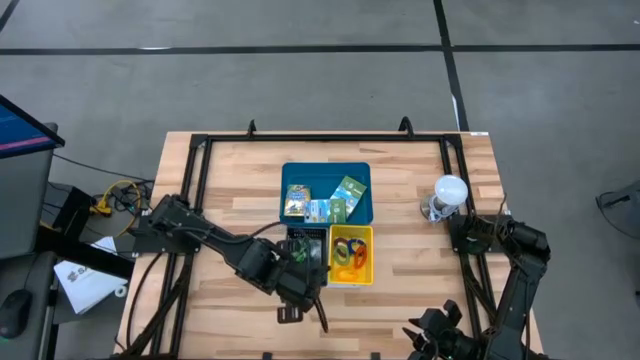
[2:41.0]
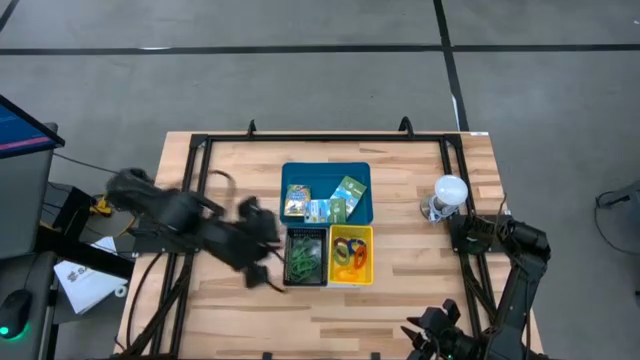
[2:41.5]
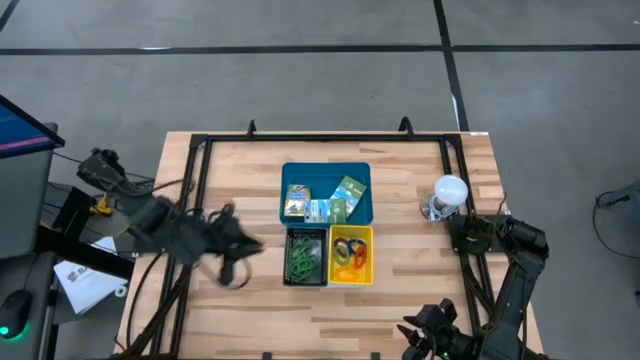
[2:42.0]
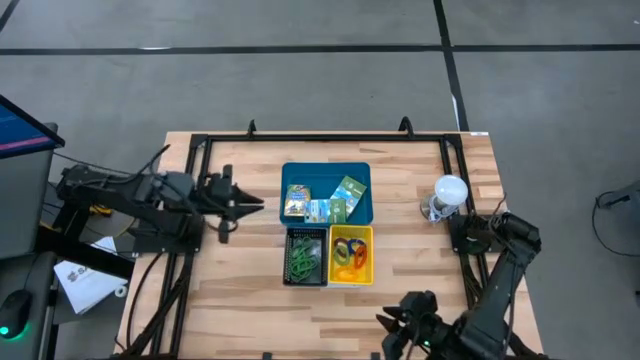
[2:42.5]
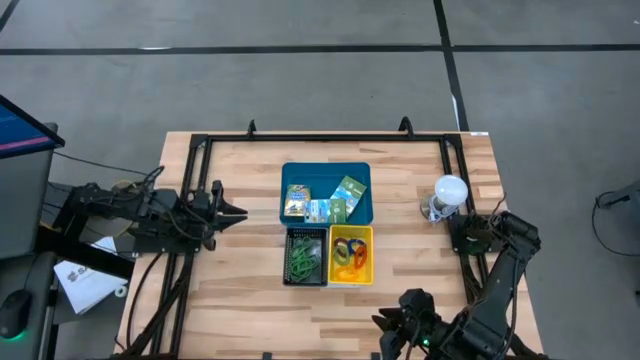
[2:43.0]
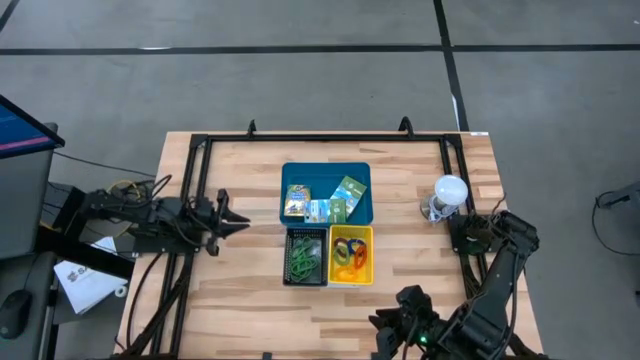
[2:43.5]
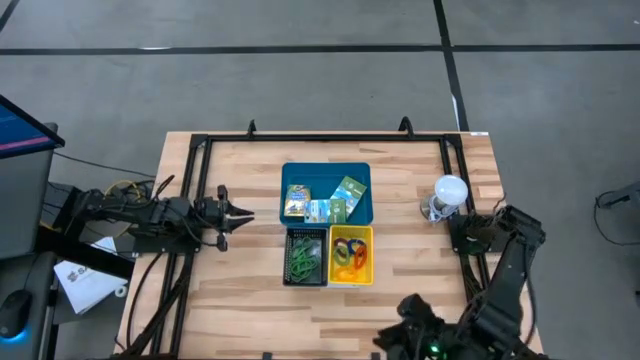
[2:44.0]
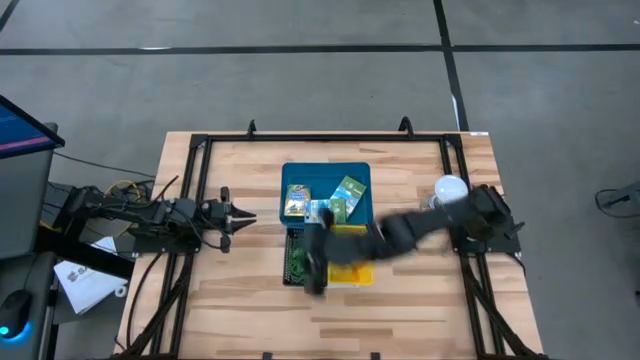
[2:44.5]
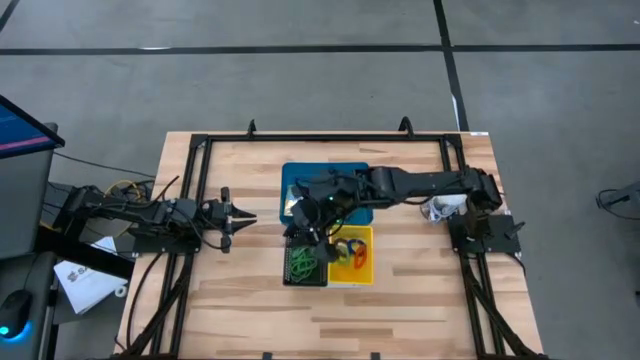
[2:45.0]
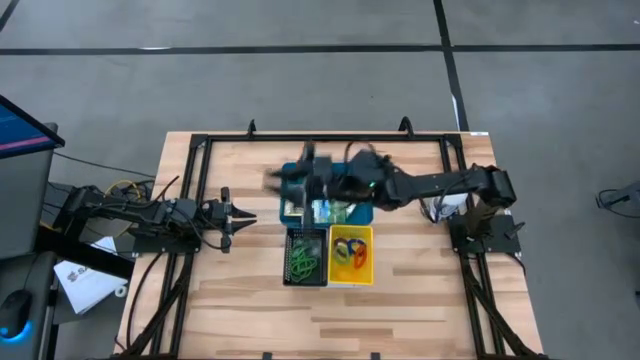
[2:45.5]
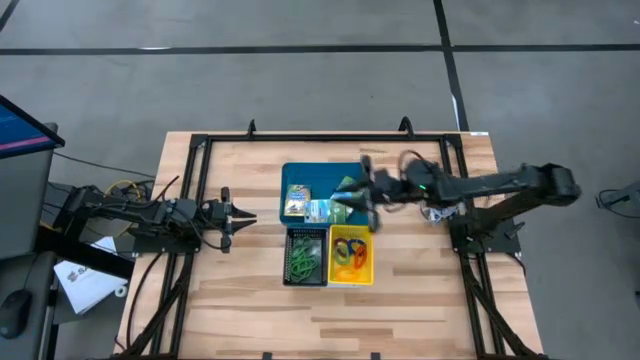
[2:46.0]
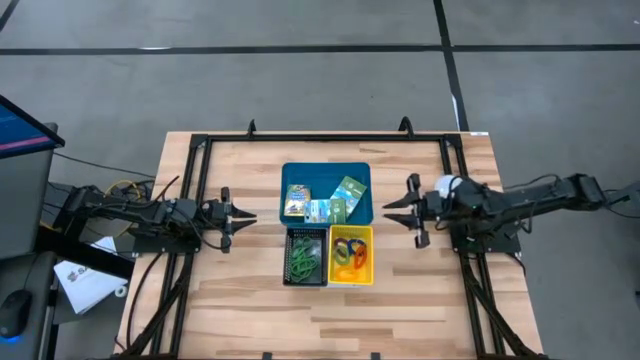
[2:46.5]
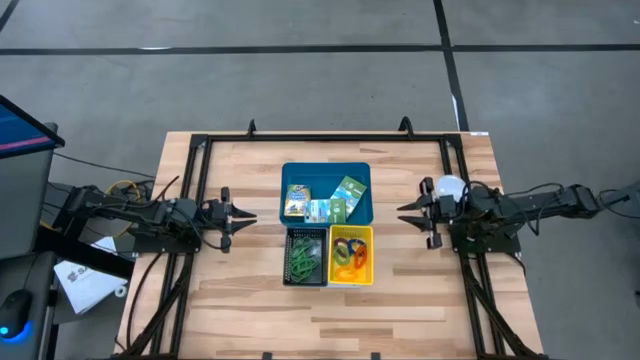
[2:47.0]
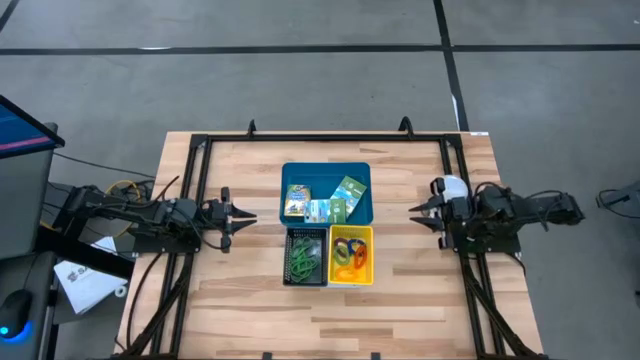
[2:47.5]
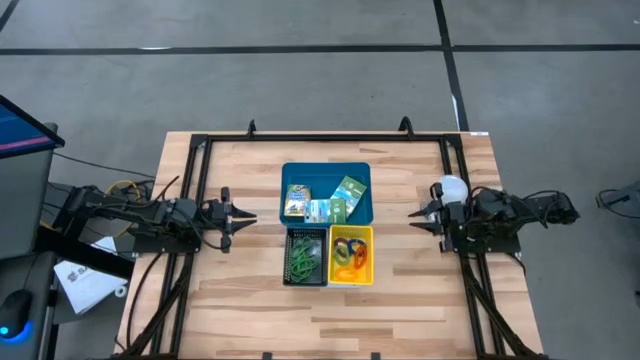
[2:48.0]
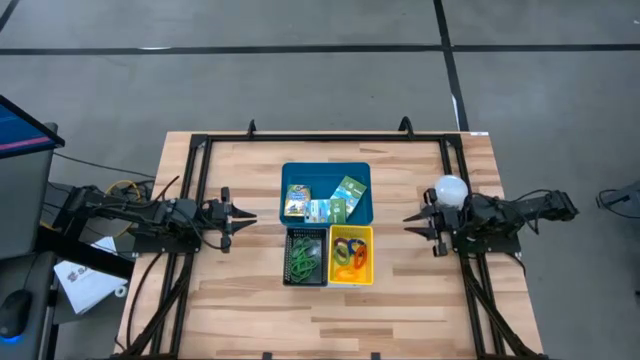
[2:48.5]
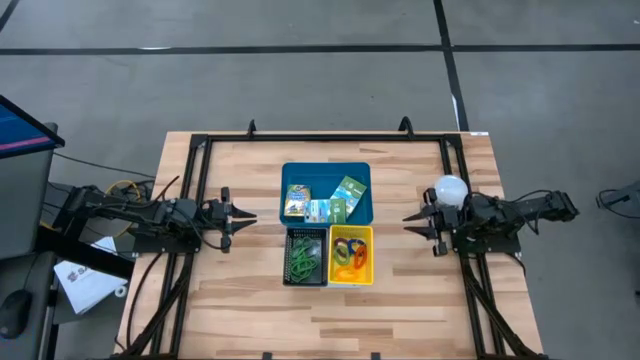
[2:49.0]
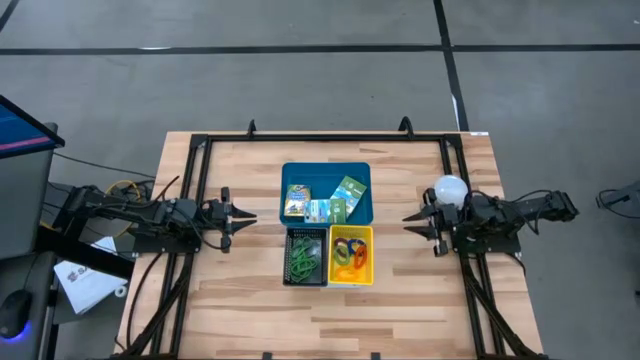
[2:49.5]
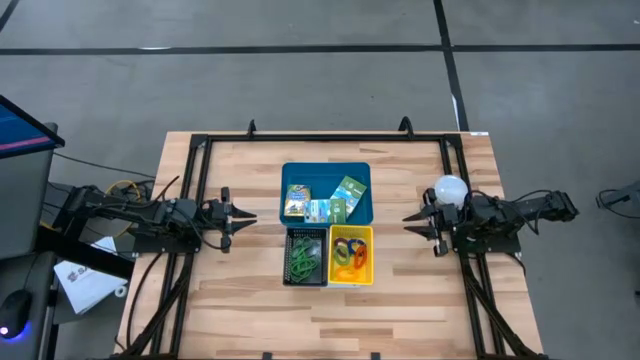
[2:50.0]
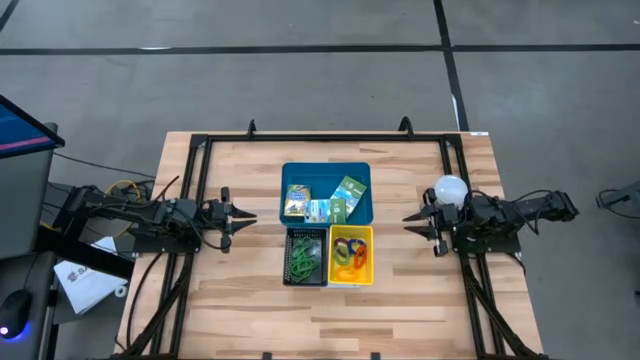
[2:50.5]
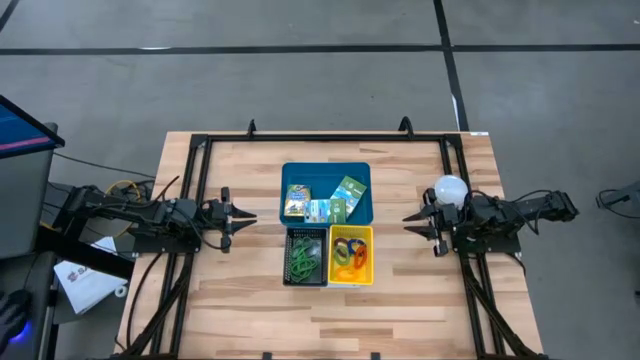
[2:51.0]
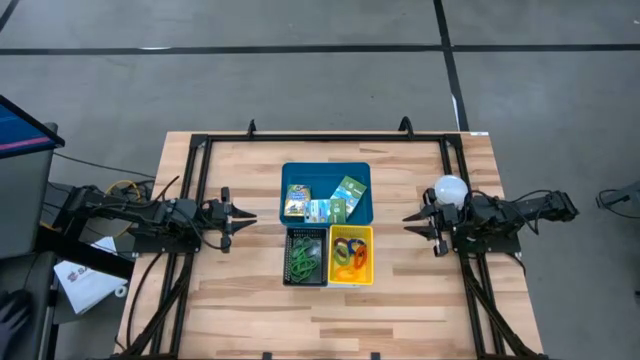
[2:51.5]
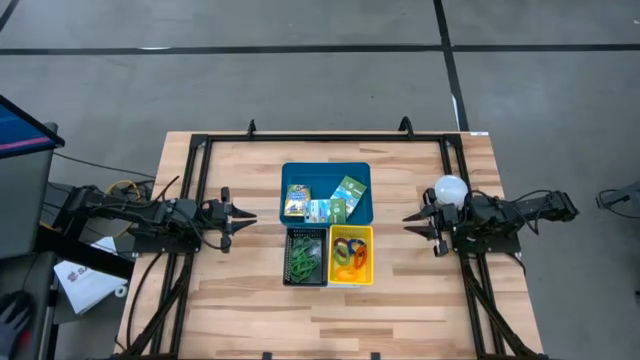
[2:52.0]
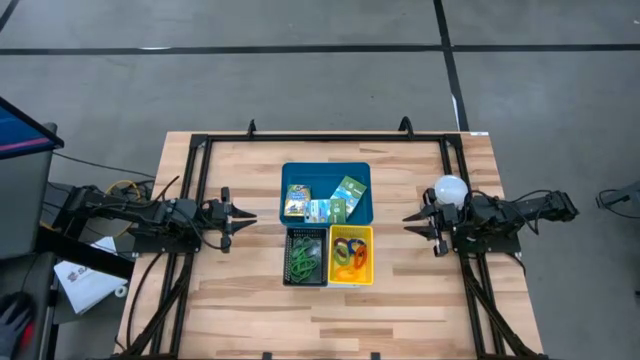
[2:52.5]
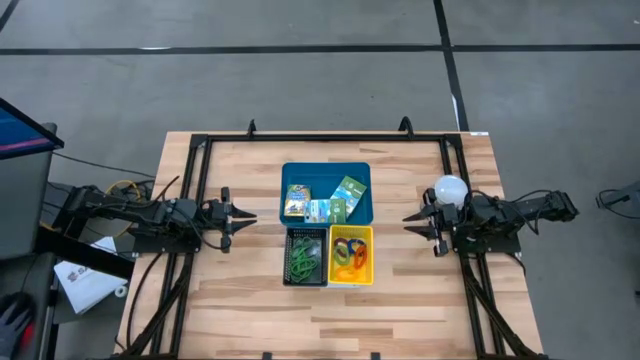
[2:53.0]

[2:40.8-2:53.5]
Task: Pick & Place Office Desk Supplies
Return to Home Position

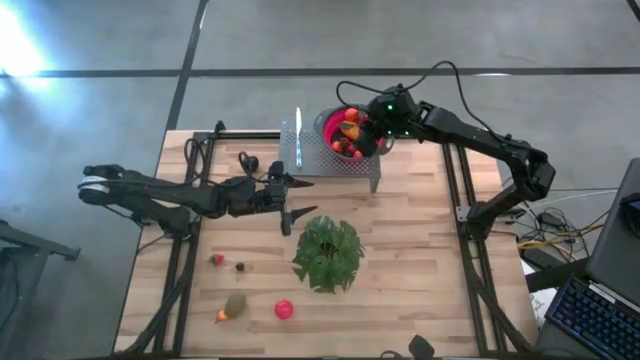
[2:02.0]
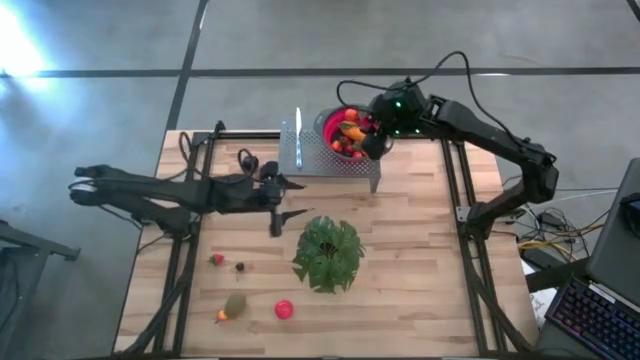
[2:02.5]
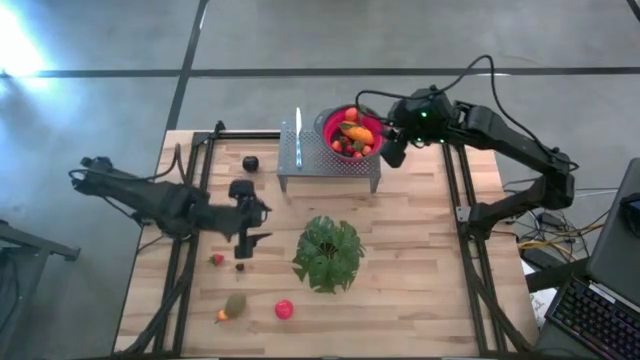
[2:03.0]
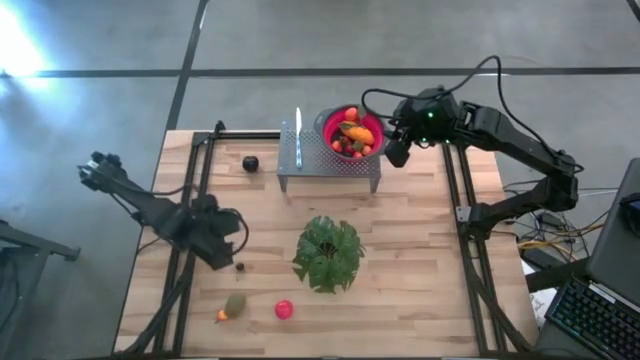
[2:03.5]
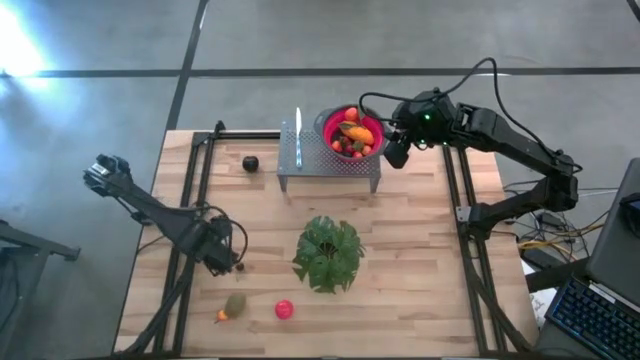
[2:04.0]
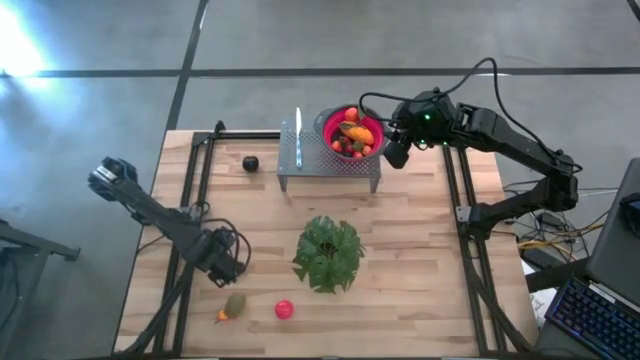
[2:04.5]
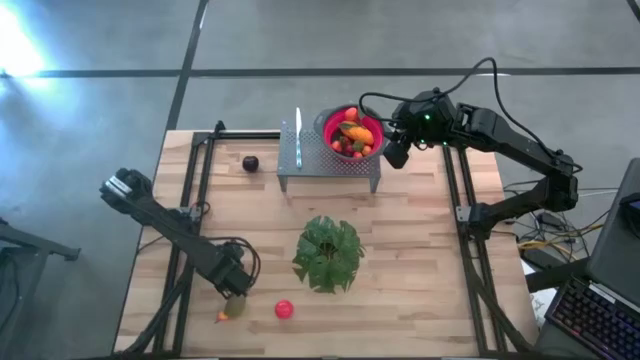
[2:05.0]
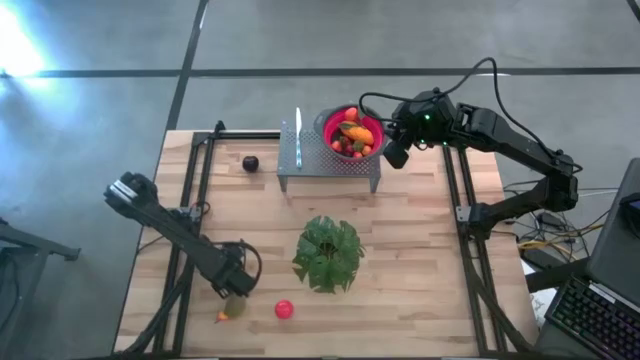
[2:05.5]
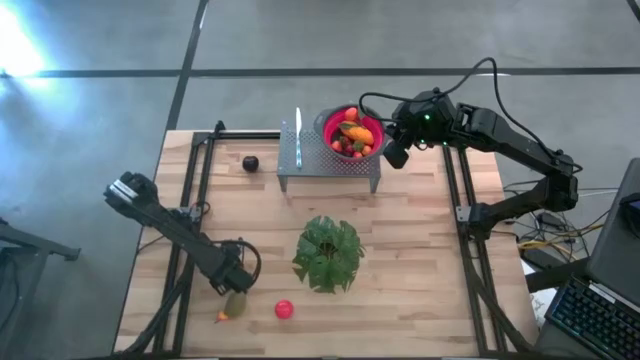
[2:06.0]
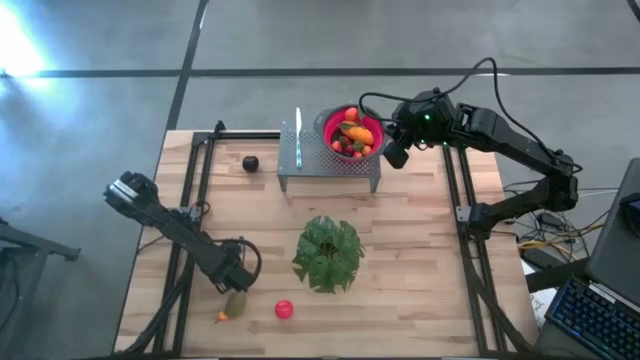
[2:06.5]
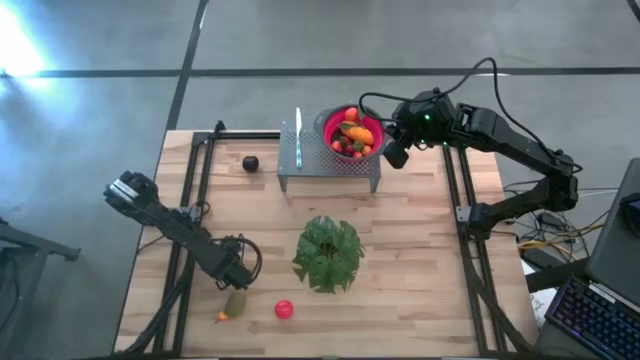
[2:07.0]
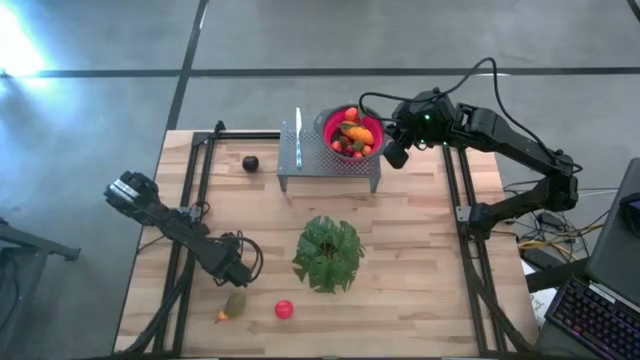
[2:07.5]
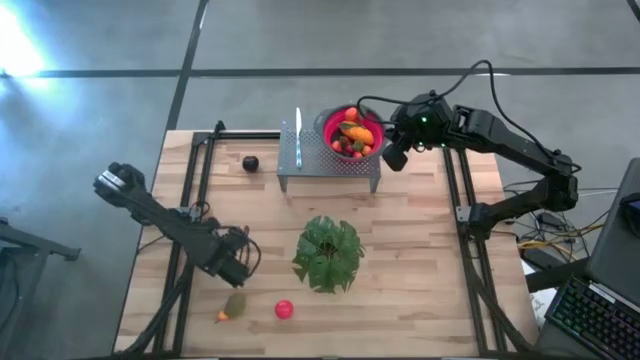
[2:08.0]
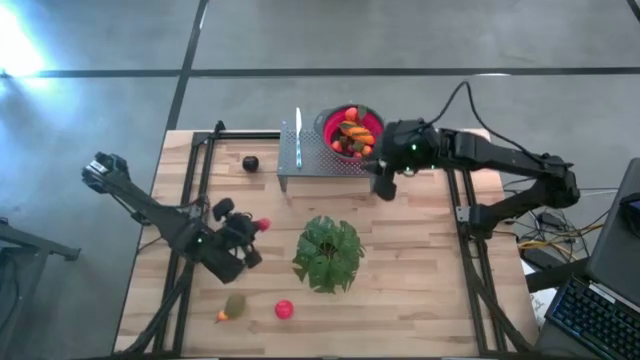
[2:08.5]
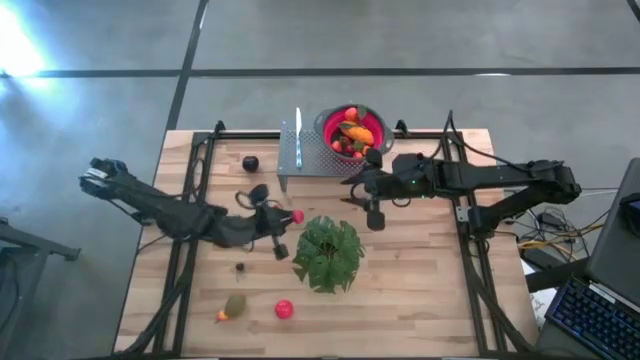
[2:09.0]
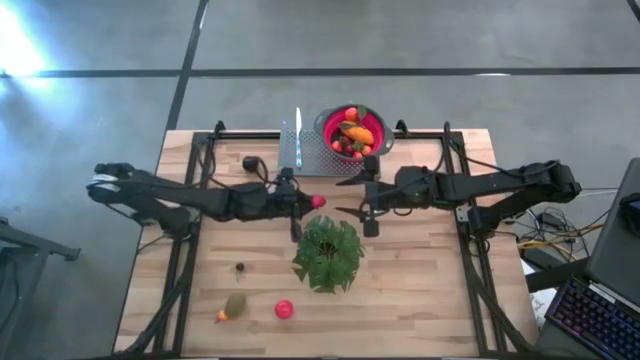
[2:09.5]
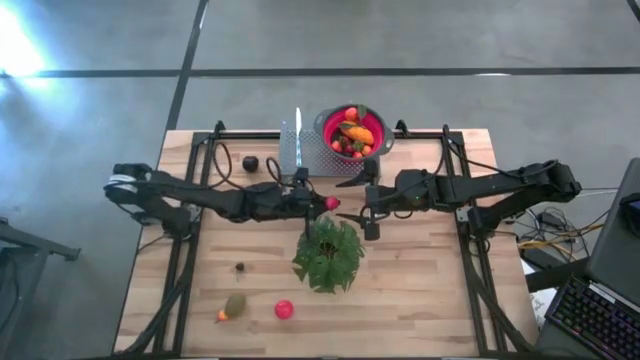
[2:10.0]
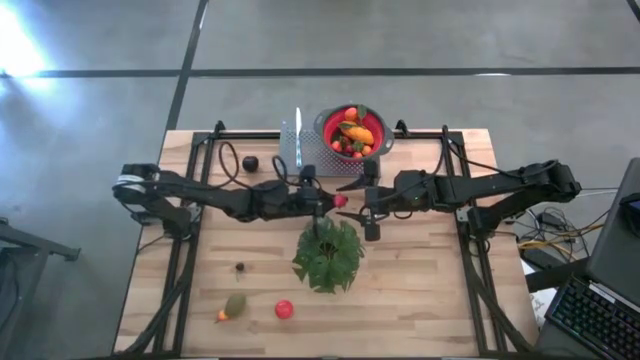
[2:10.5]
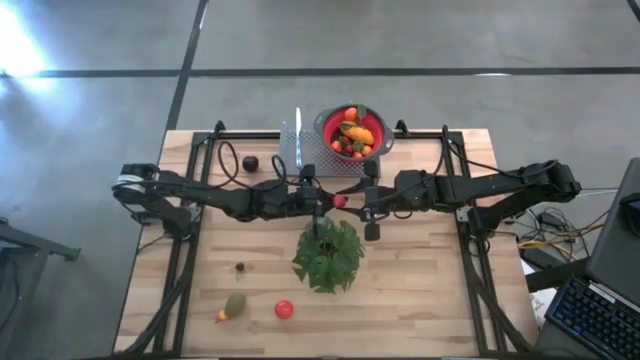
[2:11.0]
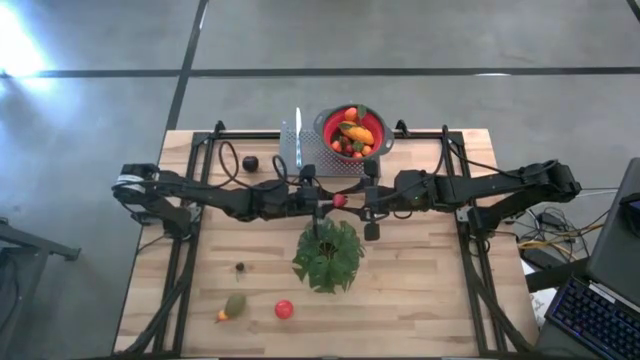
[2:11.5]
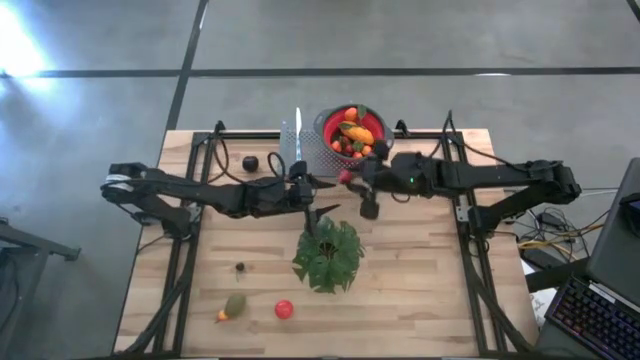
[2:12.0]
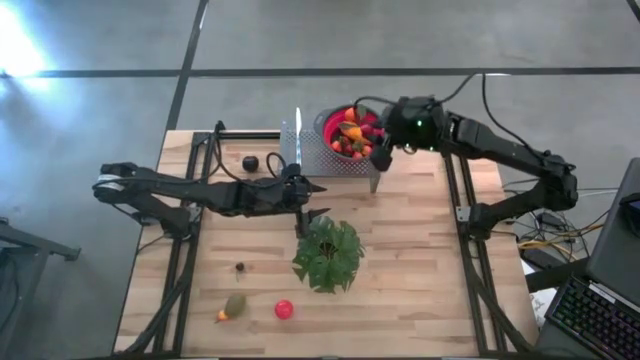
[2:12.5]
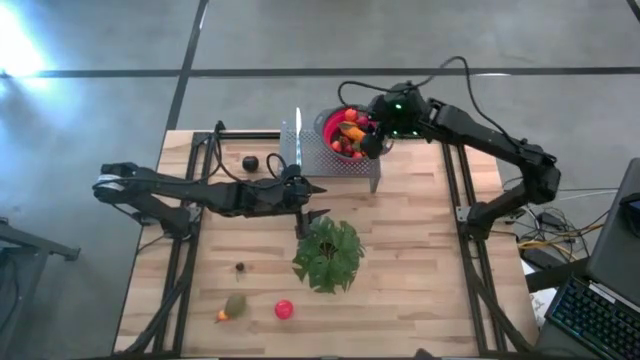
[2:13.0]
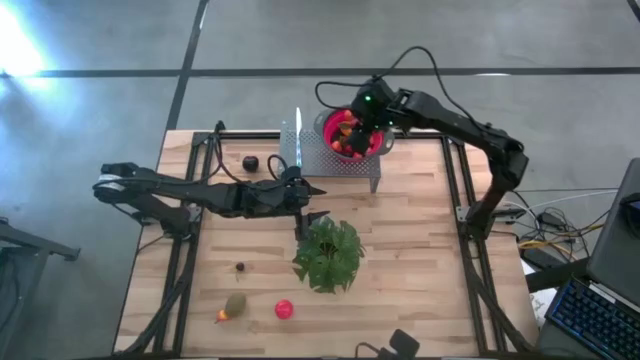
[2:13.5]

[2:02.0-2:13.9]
Task: Pick & Place Fruit
Put the red strawberry into the red strainer bowl on the shelf
